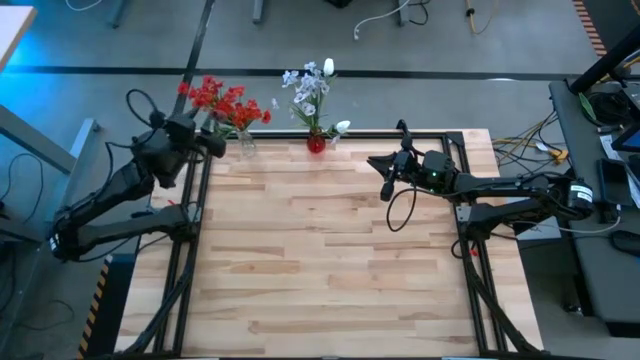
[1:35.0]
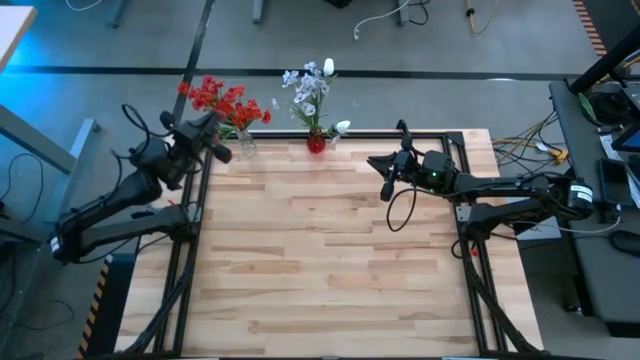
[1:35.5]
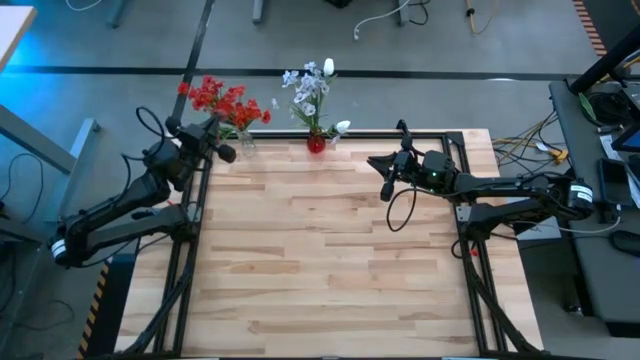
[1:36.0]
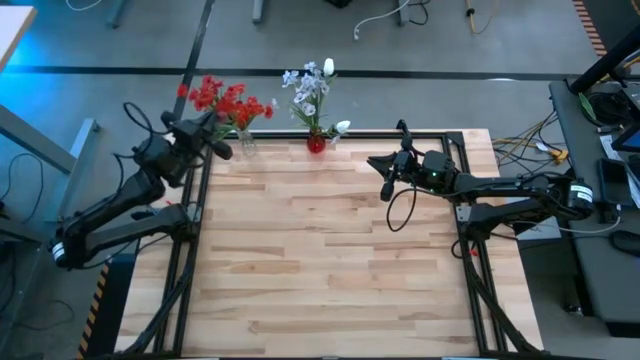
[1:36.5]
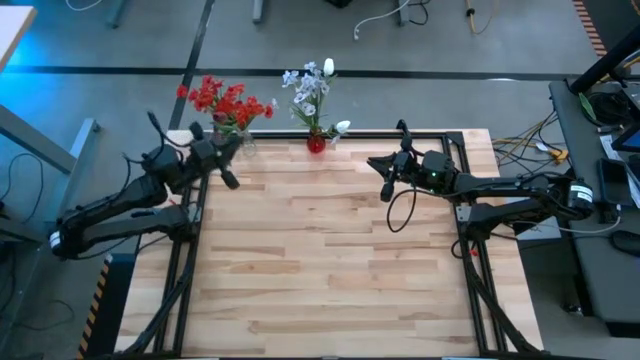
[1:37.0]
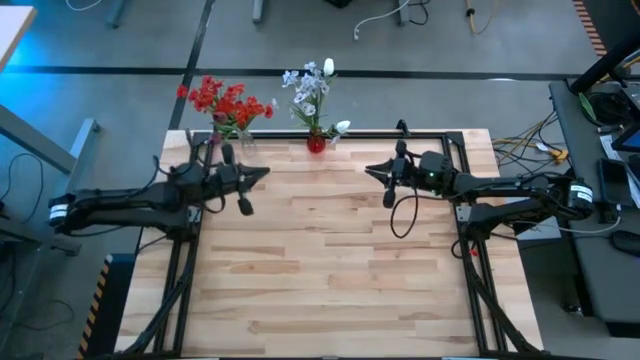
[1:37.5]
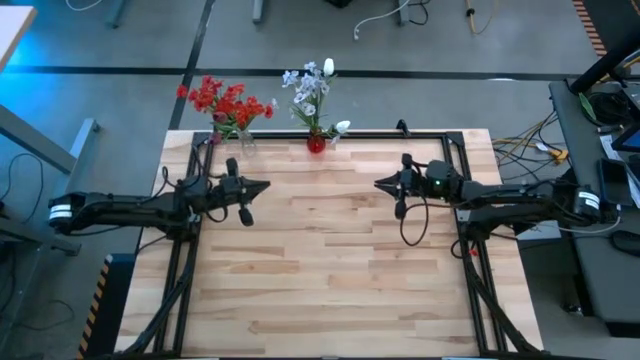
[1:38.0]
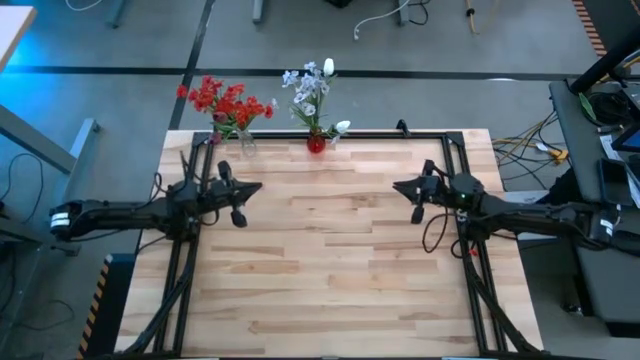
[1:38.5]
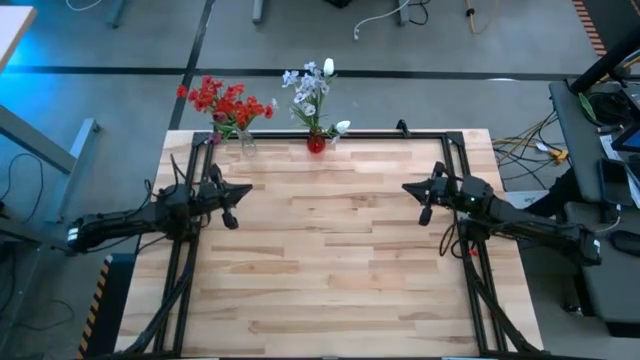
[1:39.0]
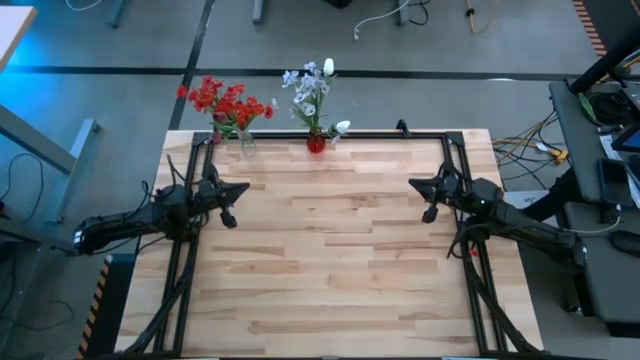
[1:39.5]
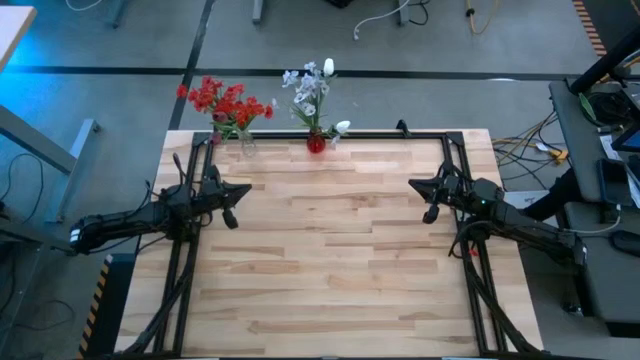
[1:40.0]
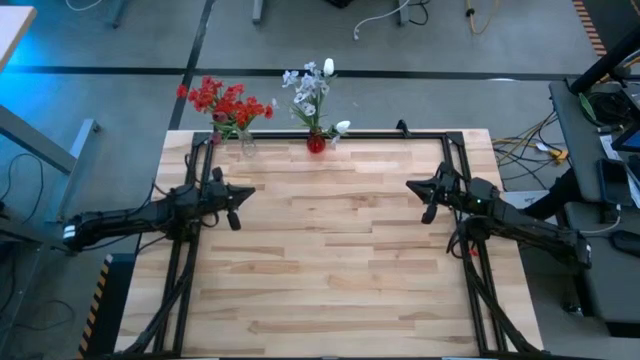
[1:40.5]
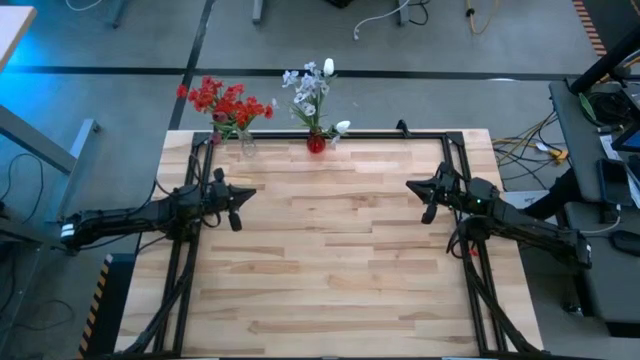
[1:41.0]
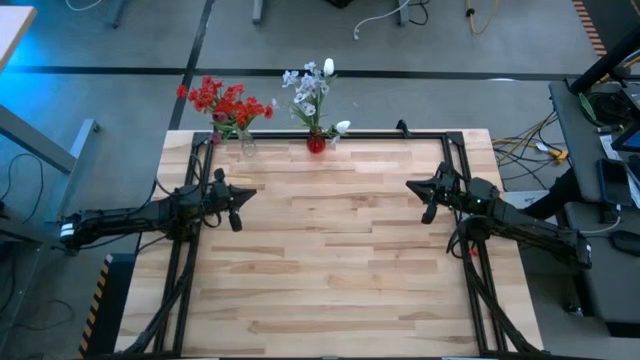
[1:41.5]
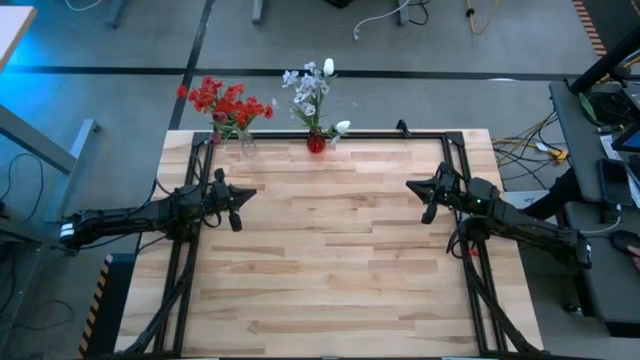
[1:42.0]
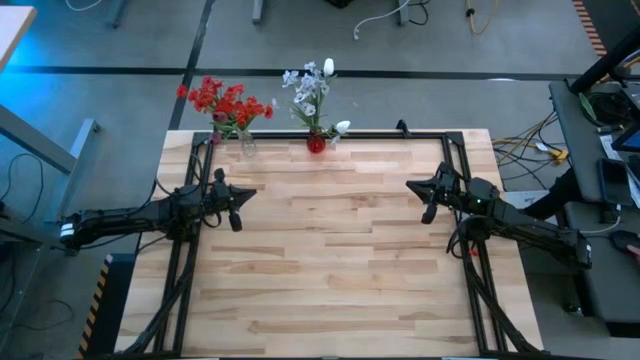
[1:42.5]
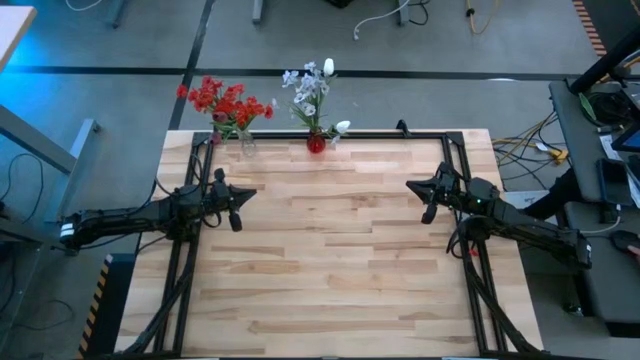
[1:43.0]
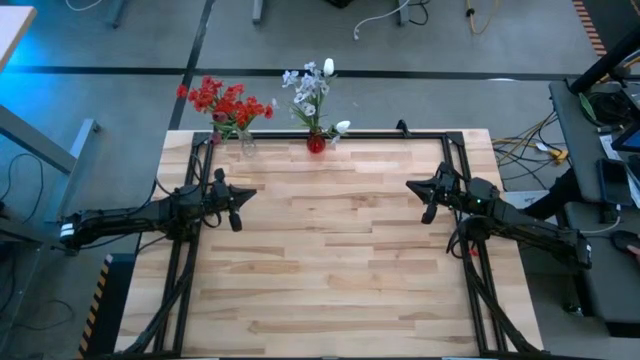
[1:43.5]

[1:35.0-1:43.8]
Task: Sort flowers into vase by color
Return to Home Position

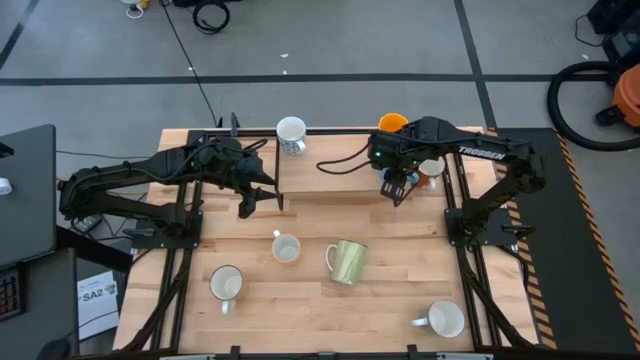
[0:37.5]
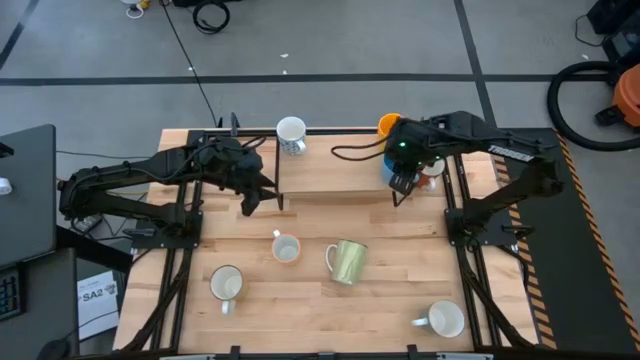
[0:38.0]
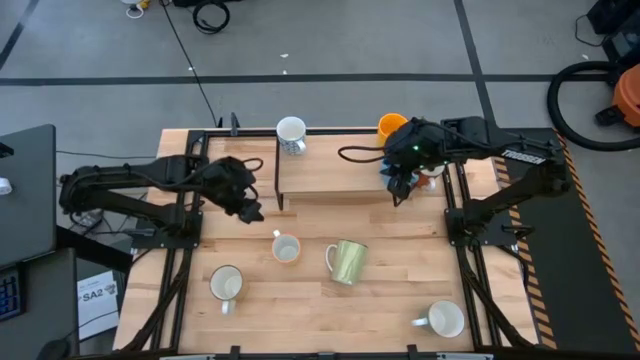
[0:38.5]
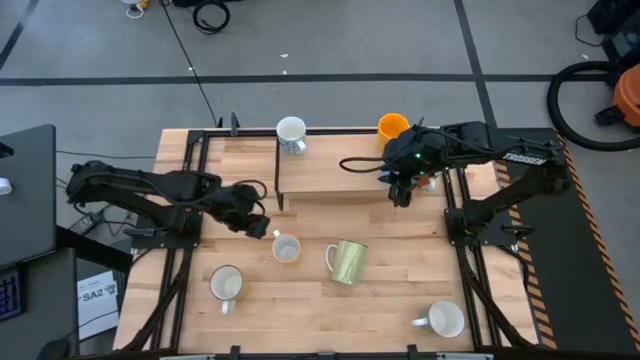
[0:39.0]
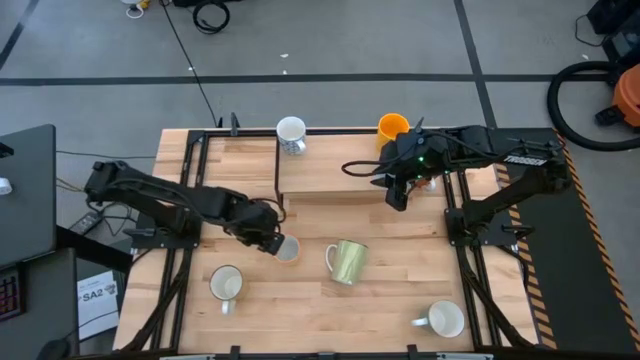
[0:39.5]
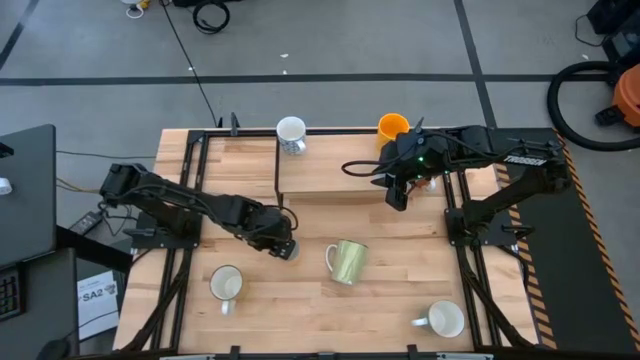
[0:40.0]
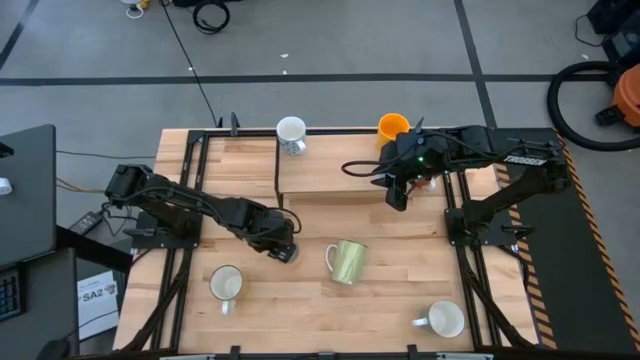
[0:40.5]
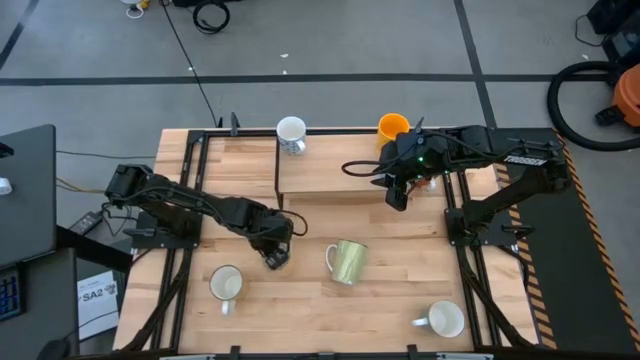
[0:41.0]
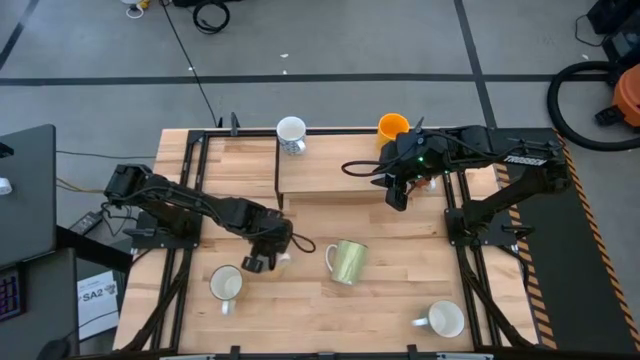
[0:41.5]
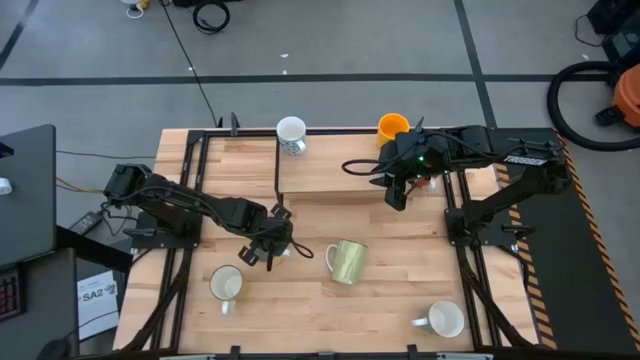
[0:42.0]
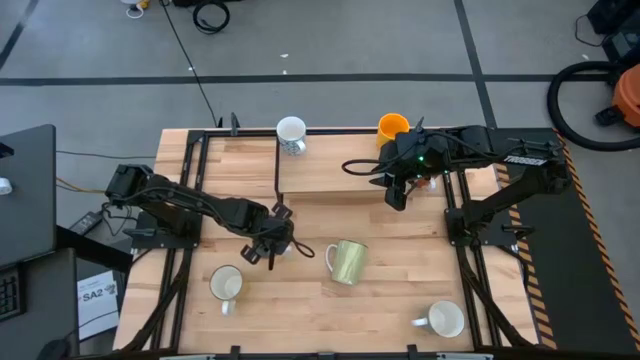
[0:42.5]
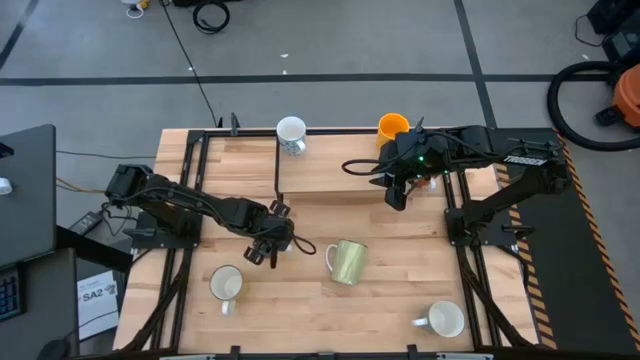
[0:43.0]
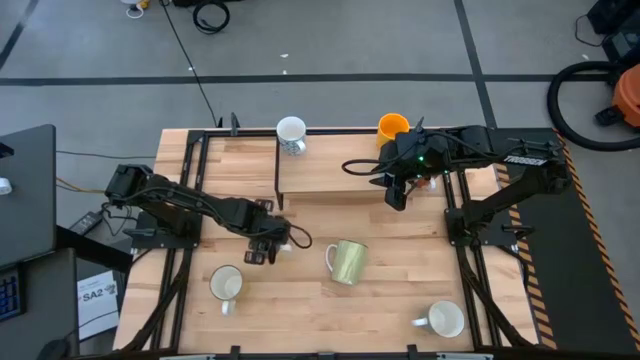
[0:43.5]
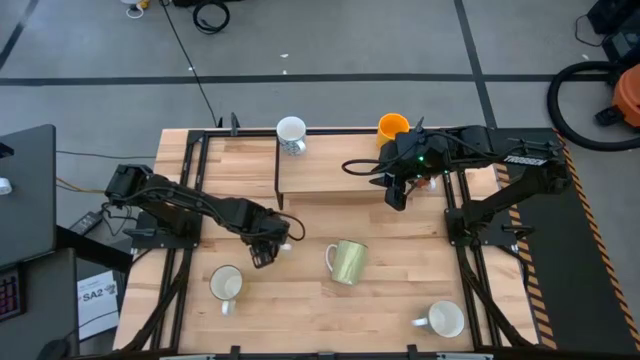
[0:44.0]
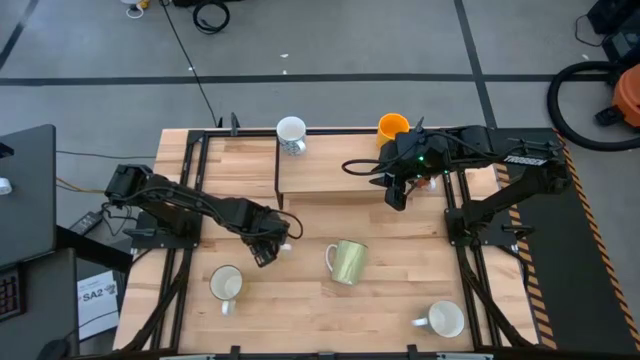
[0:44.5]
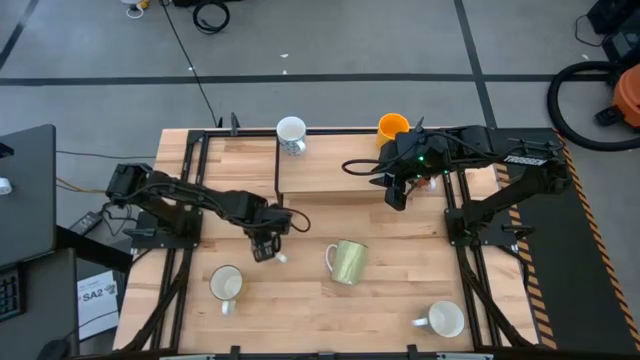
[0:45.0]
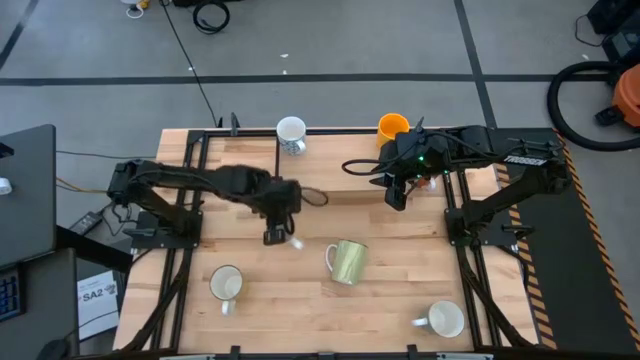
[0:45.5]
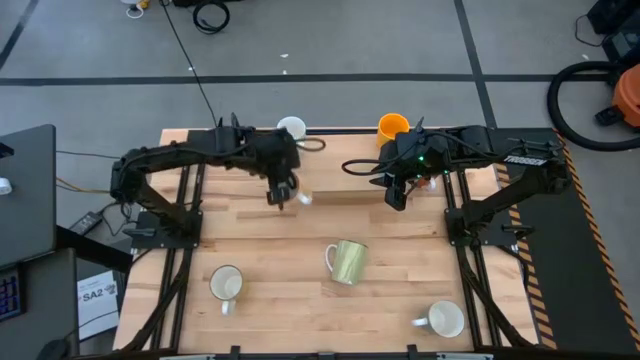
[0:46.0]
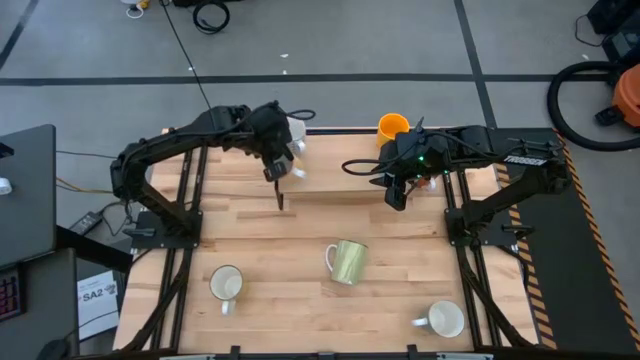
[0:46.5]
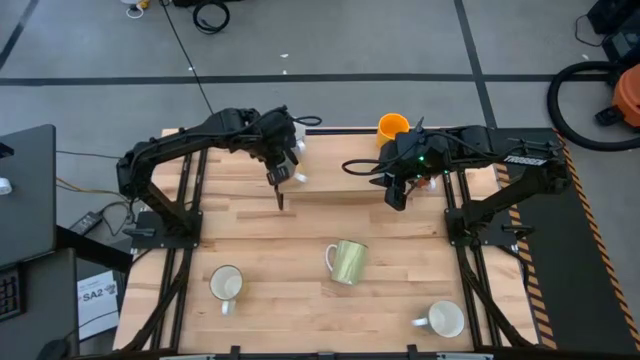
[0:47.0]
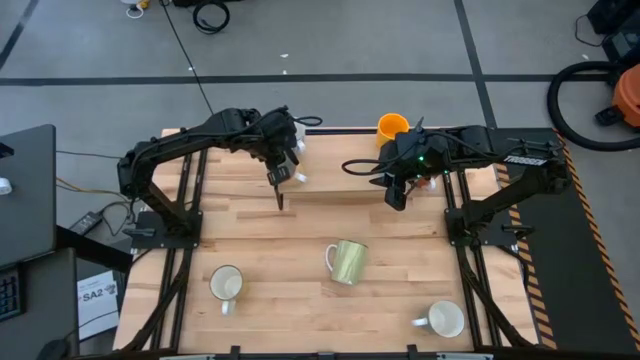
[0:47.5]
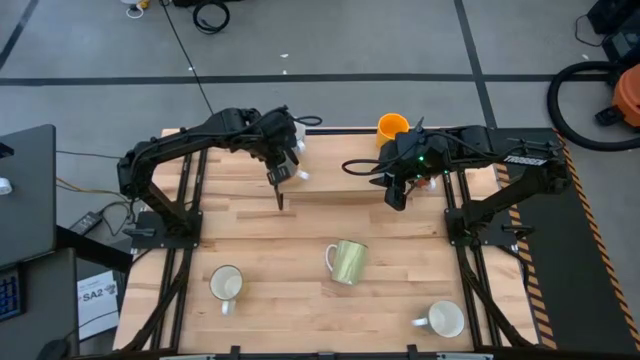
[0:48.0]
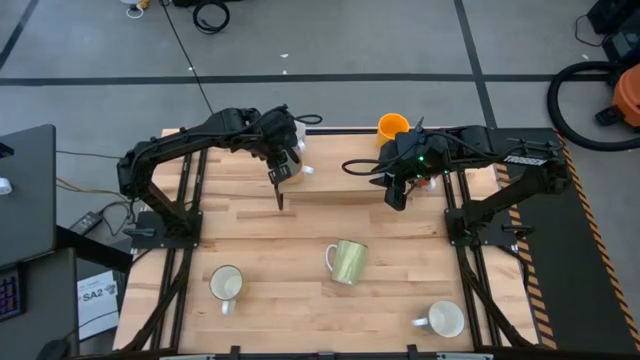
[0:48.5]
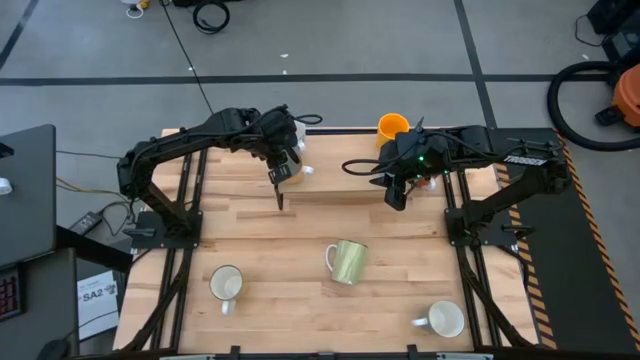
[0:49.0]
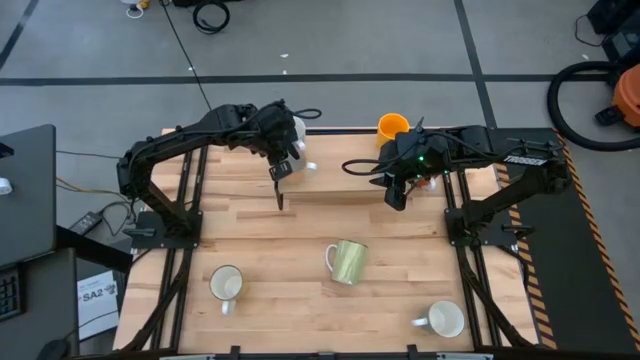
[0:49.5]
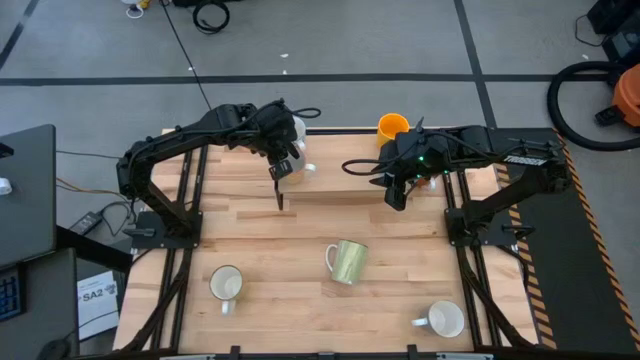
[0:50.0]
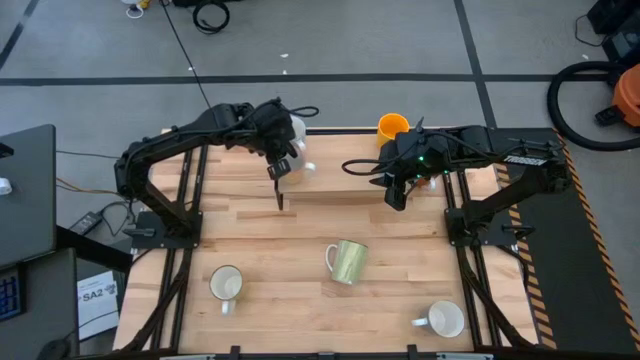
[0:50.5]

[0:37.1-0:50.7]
Task: Place coffee mugs
Put the yellow patterned mug on the shelf
